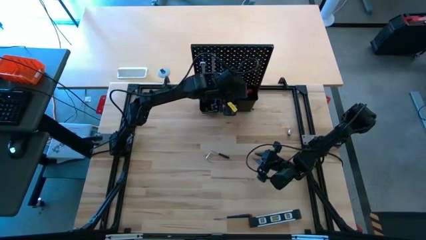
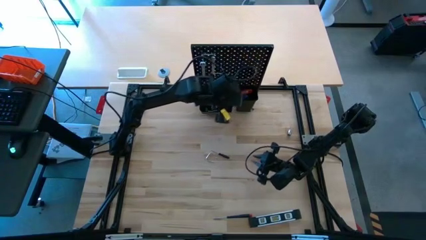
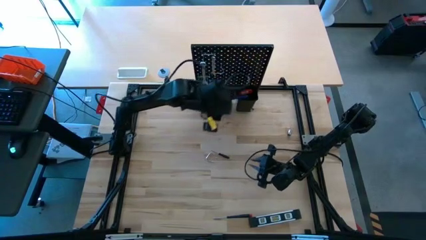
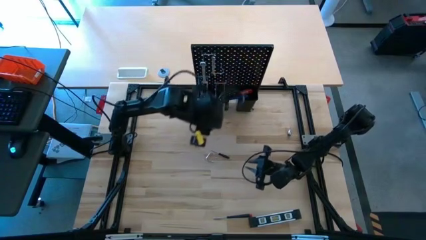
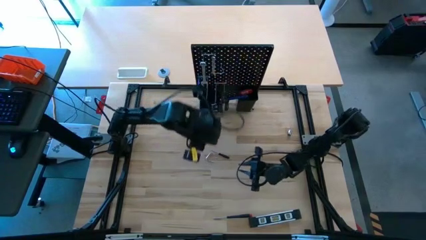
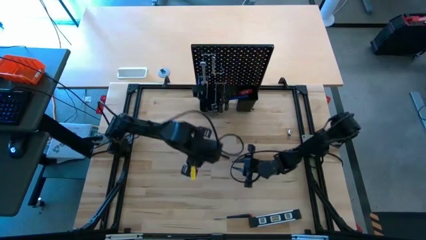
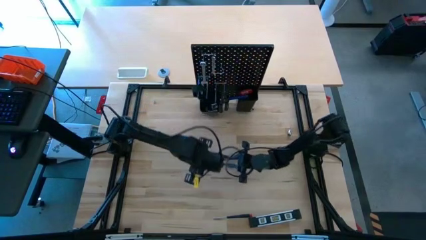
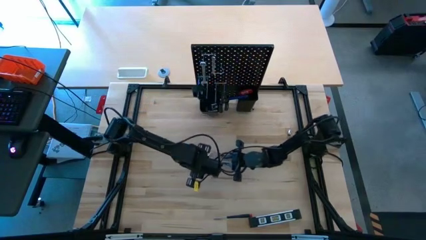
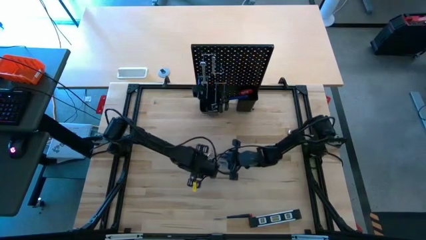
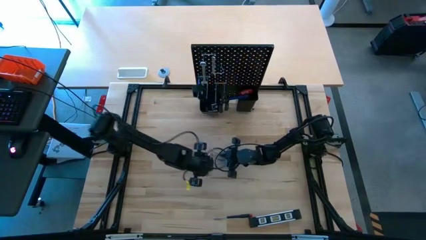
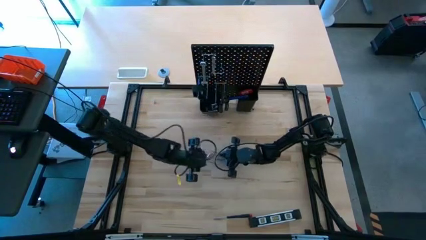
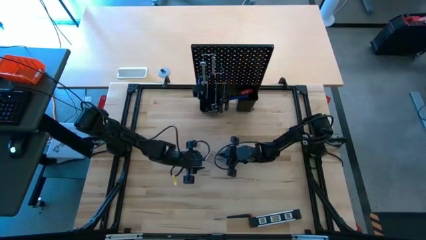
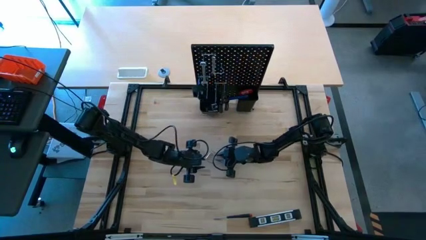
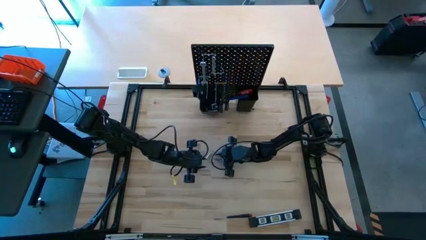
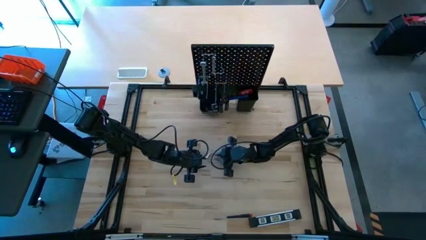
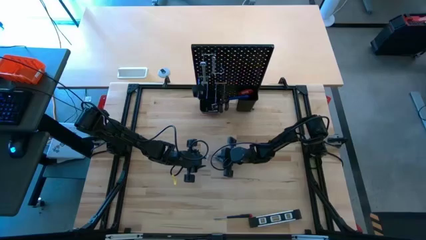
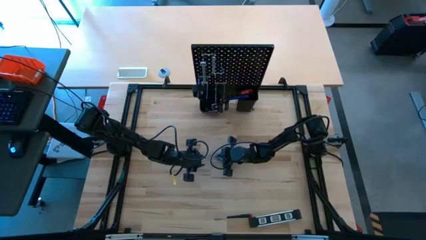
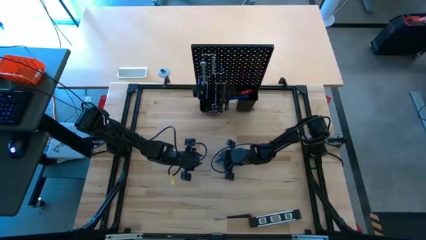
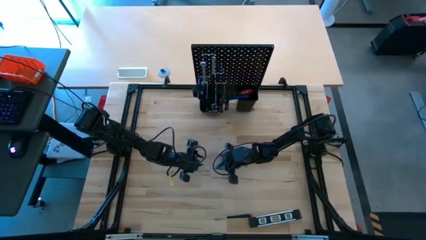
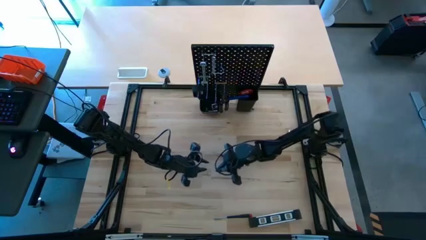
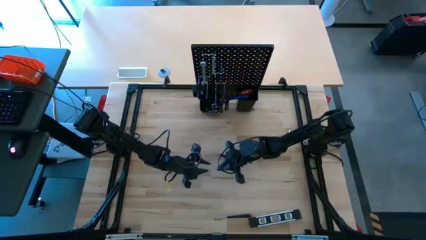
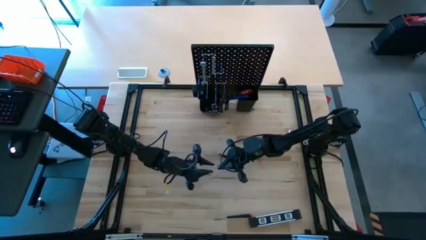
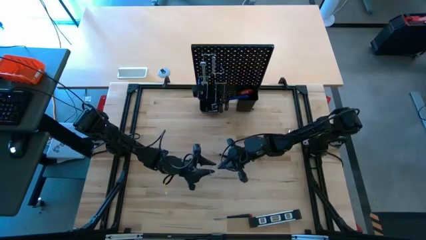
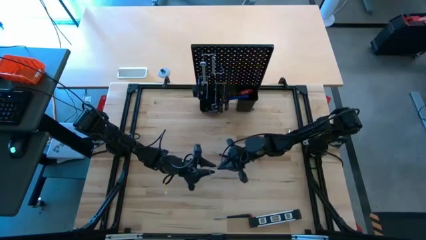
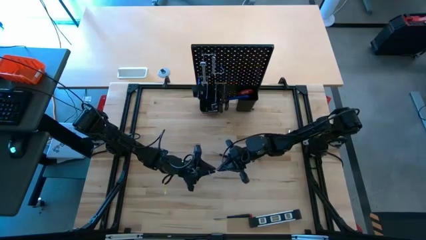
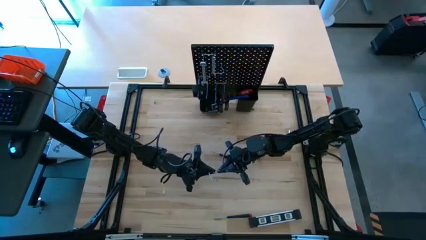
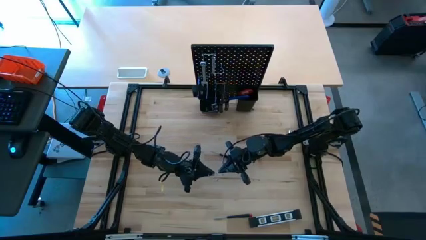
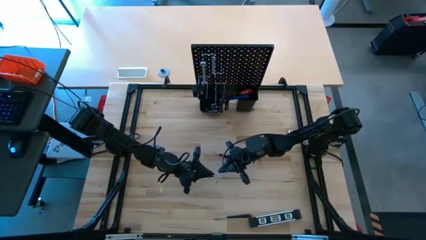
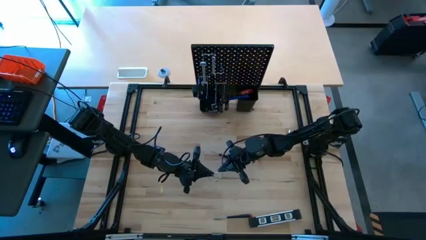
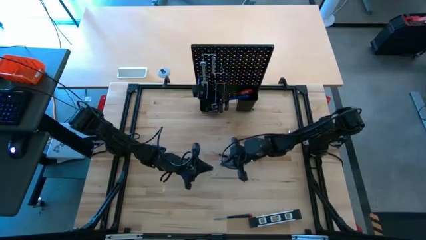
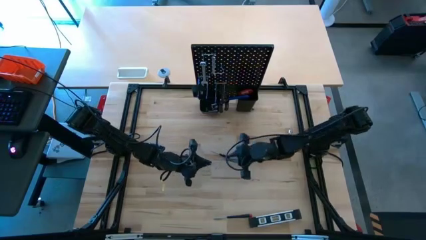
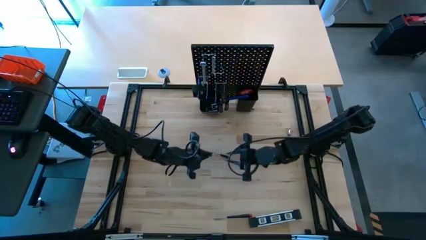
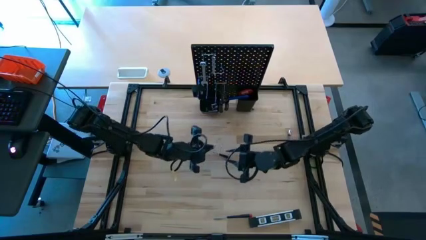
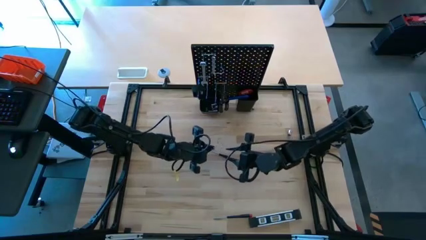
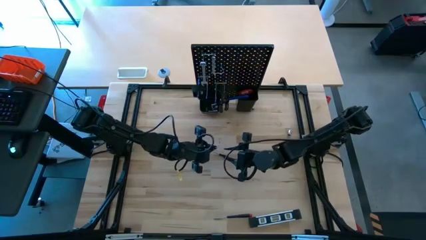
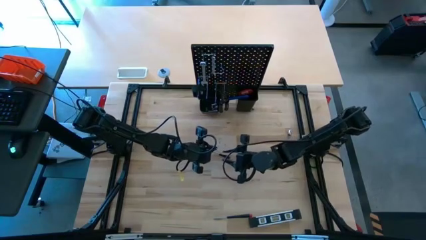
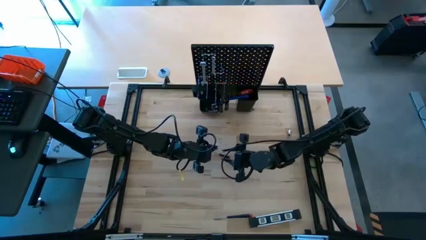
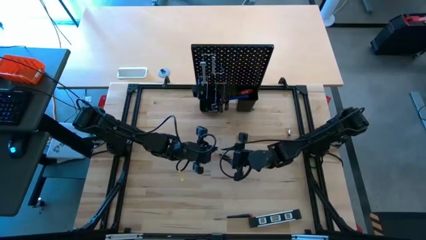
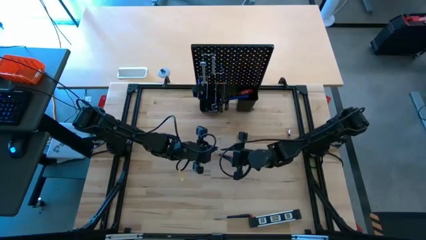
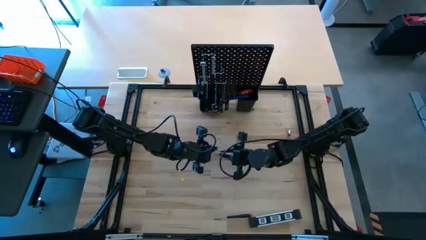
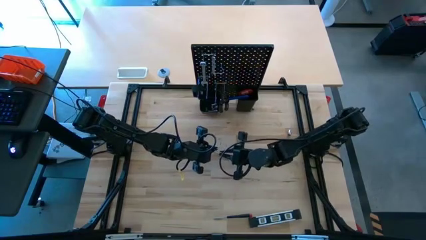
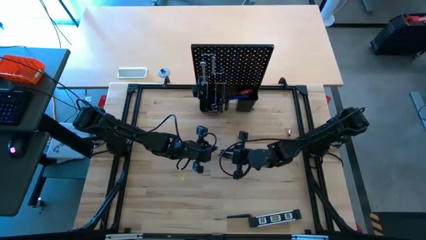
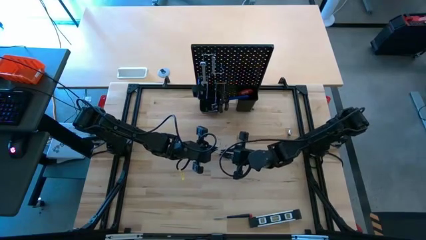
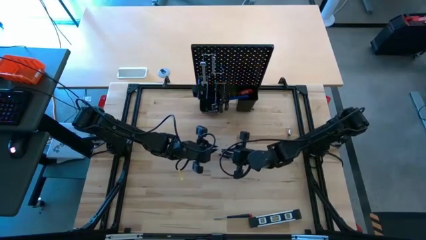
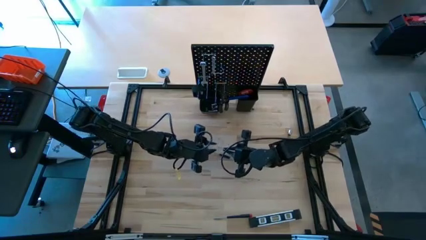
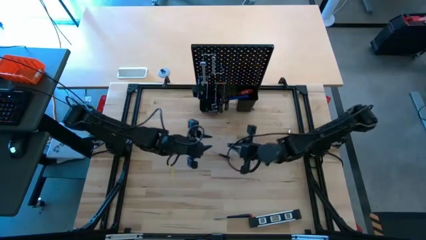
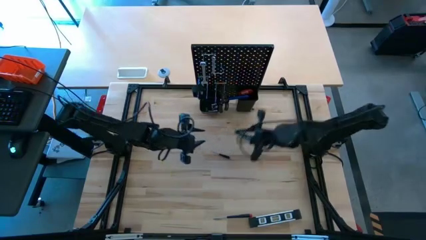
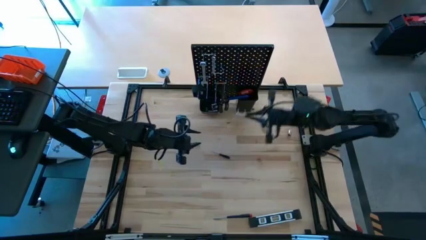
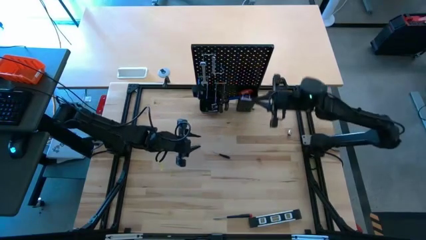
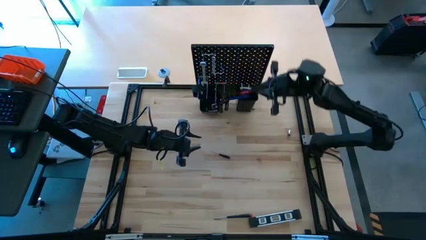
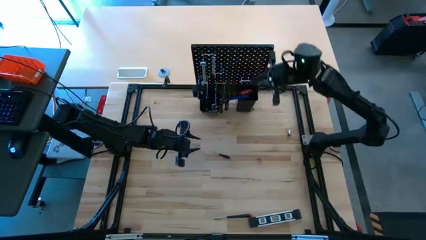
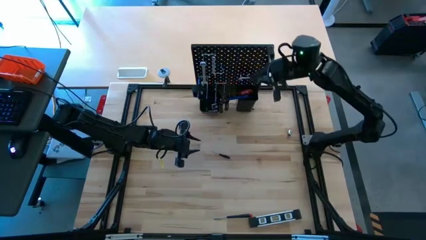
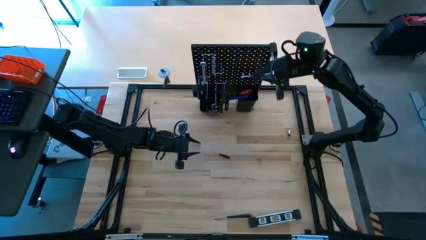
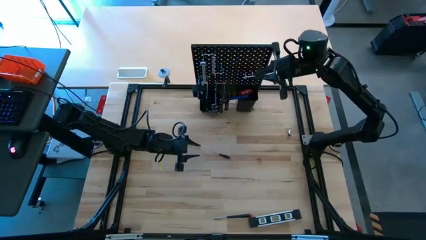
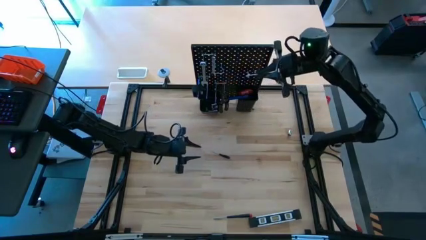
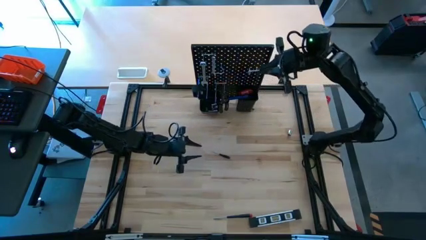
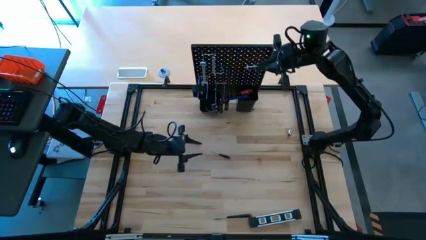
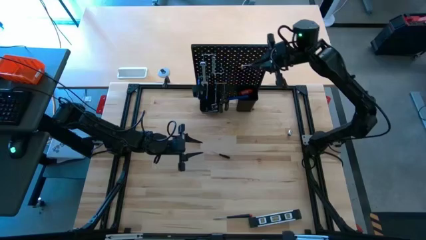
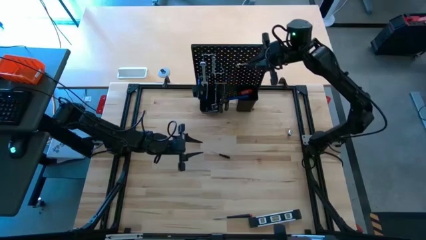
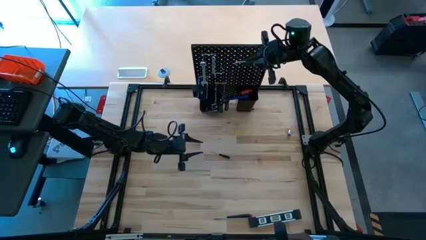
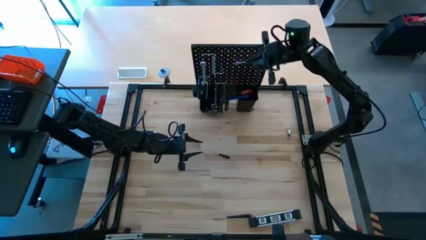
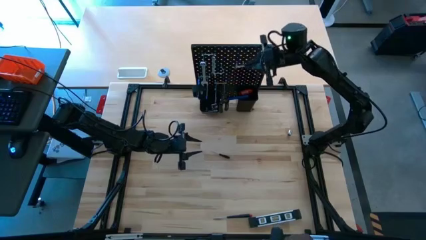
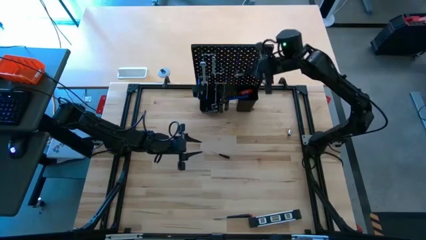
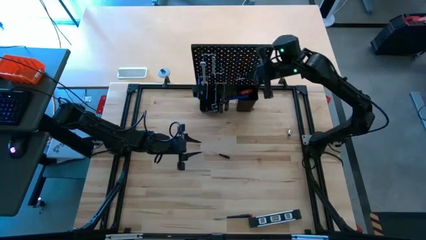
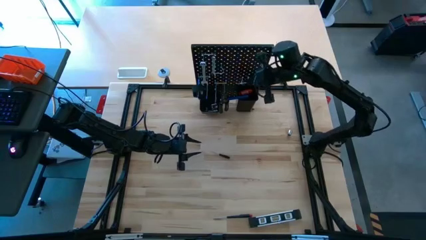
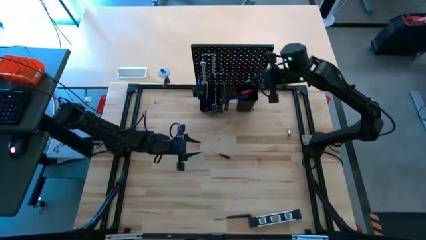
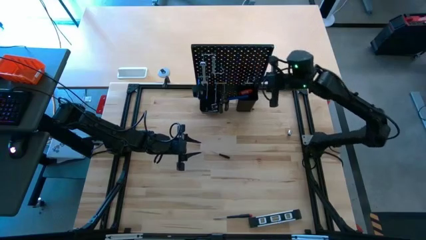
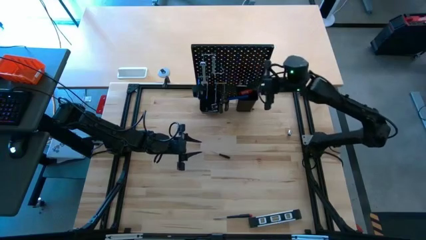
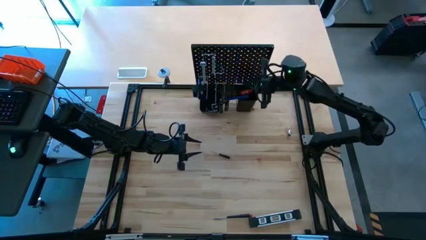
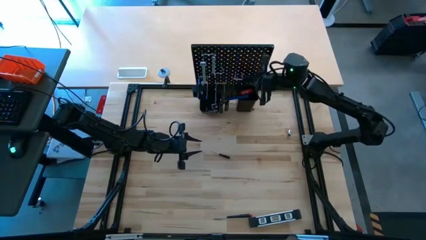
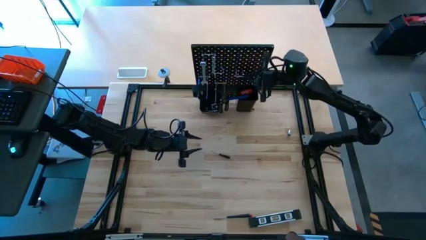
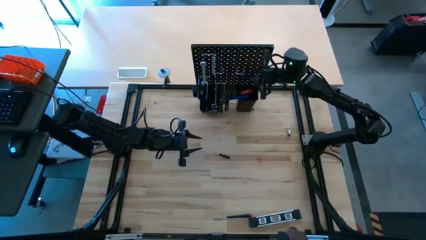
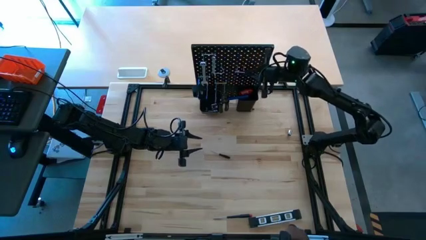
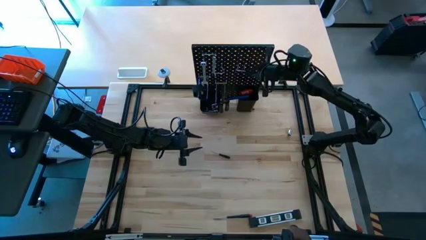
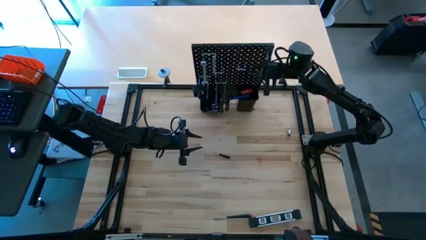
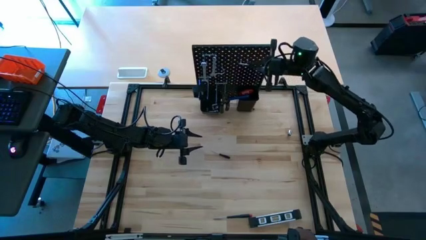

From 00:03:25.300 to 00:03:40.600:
Task: Hang tools onto peg board
Hang the binder clip on the pegboard

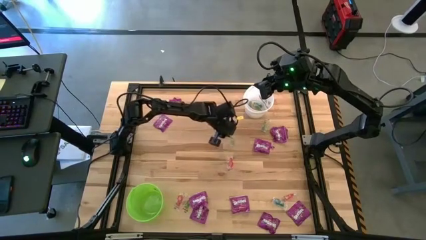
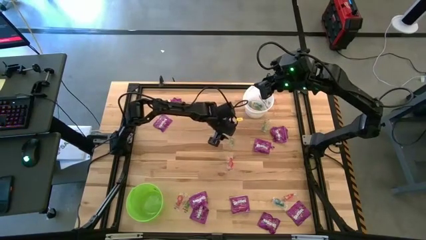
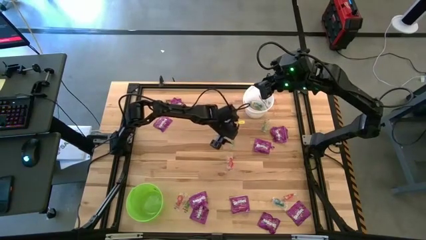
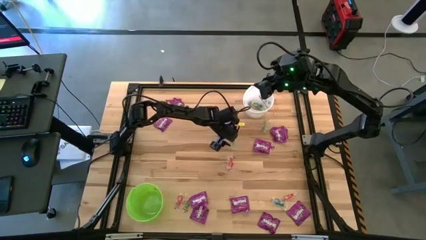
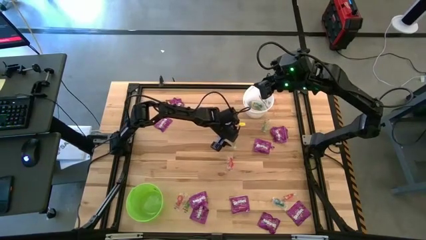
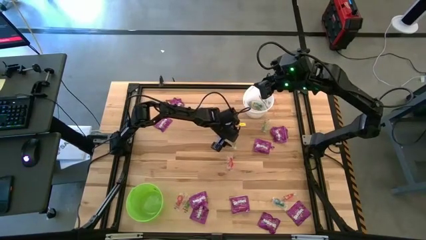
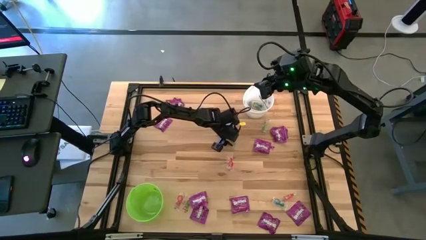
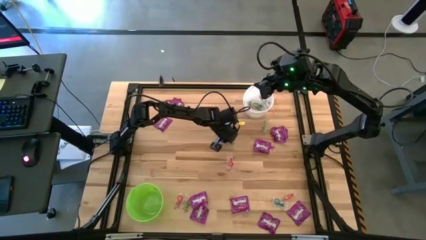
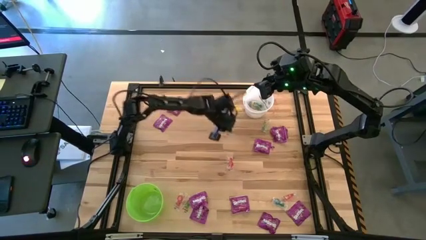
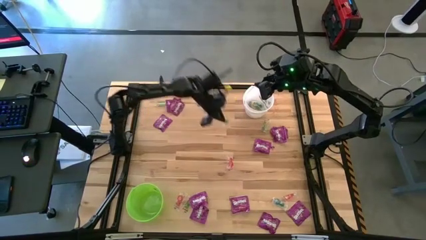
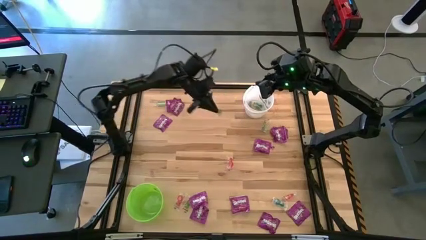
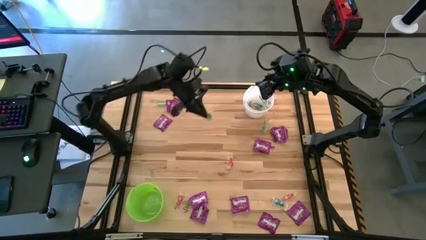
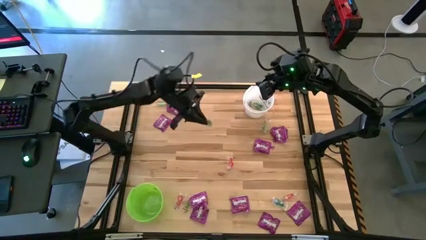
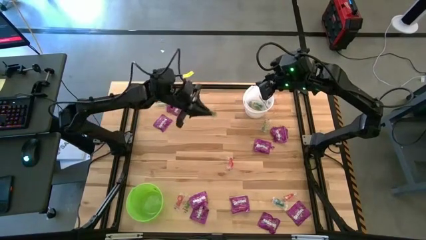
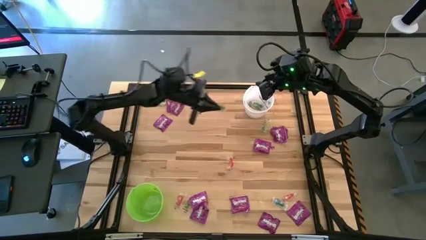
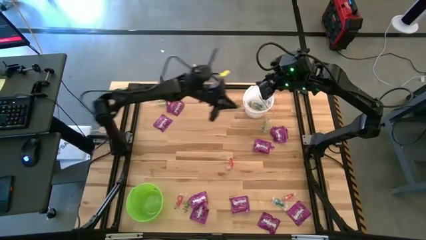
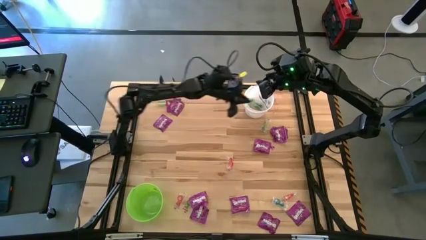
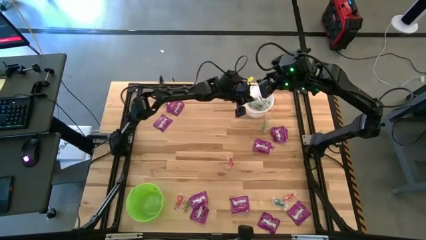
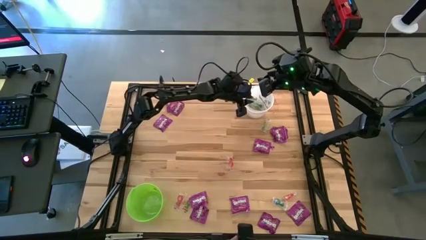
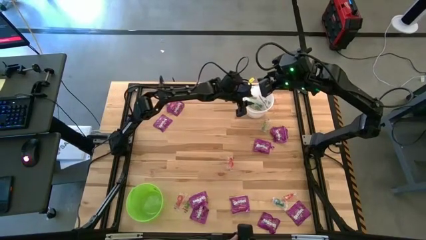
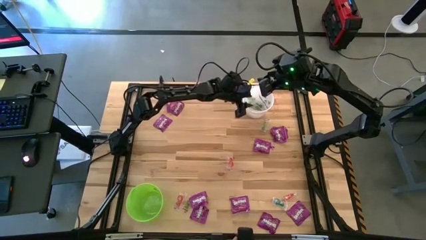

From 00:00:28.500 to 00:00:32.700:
Task: Sort candy by brand, put in halloween buckets
Put the green gummy into the white bucket
